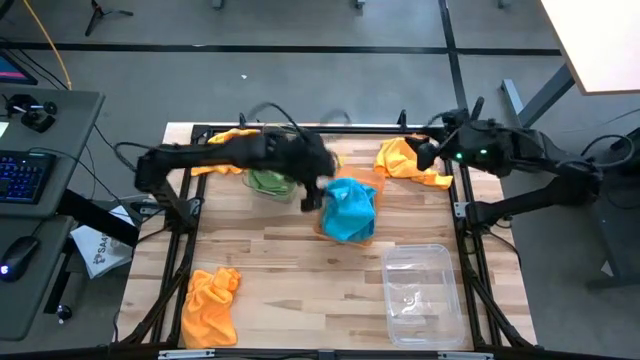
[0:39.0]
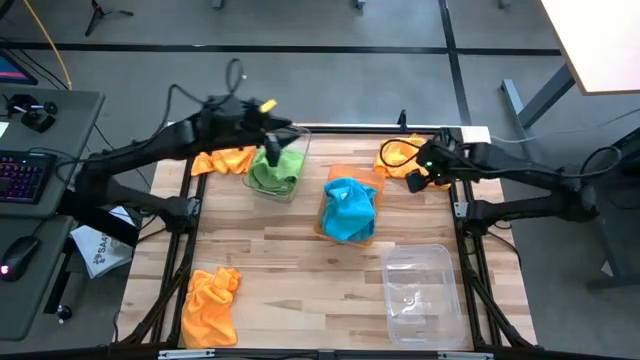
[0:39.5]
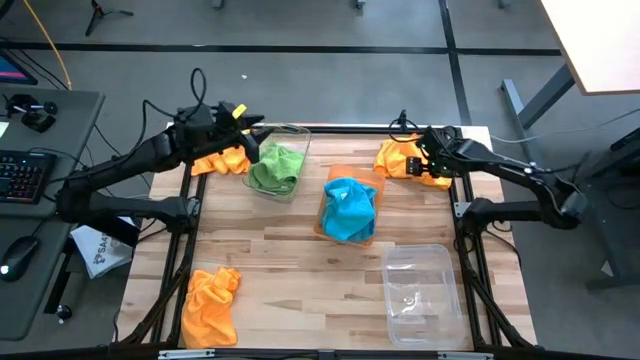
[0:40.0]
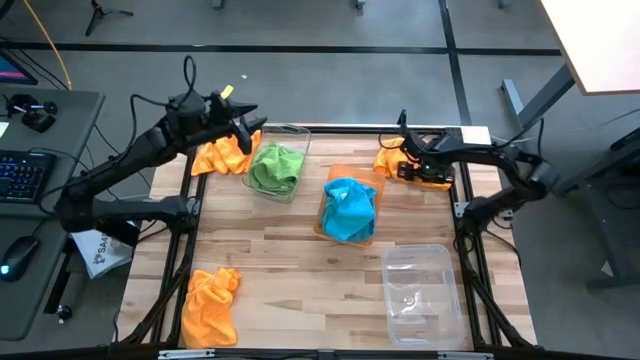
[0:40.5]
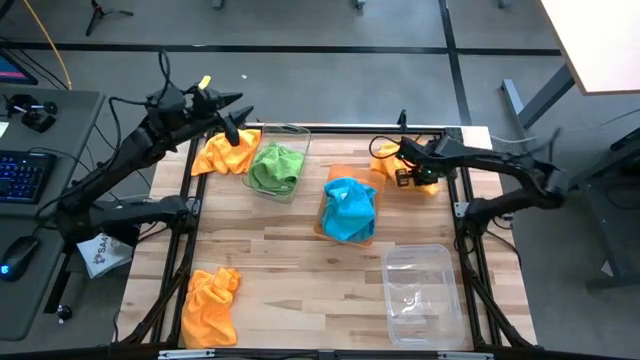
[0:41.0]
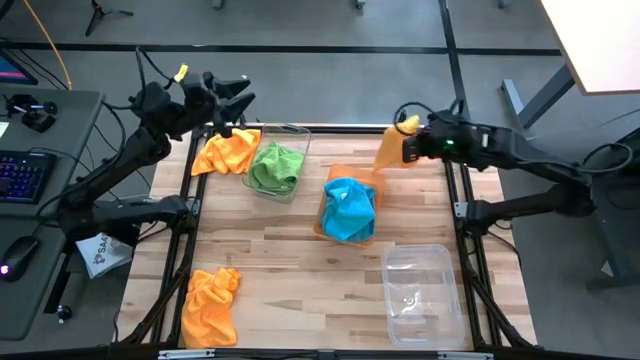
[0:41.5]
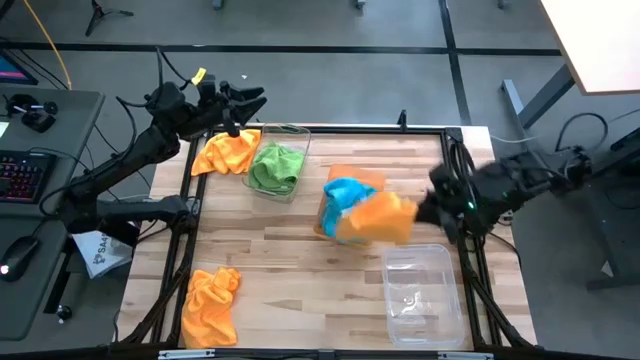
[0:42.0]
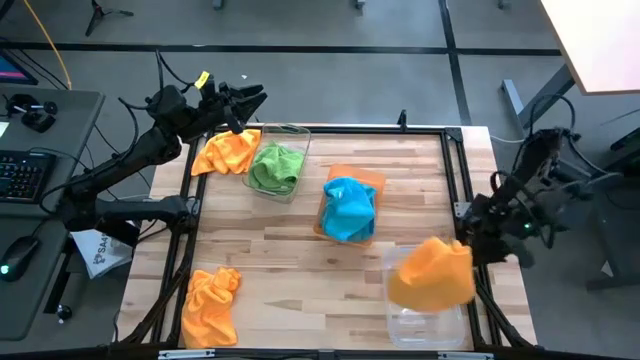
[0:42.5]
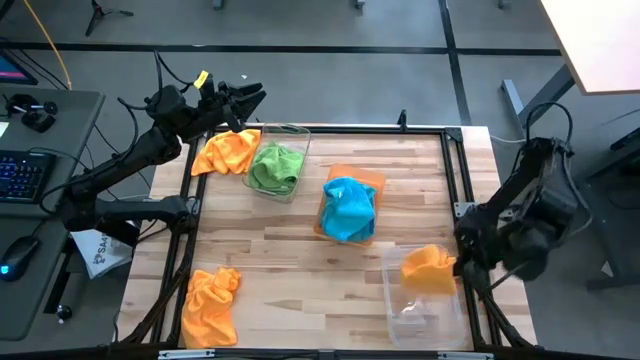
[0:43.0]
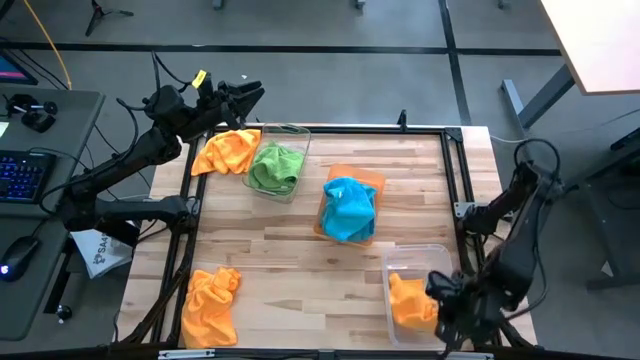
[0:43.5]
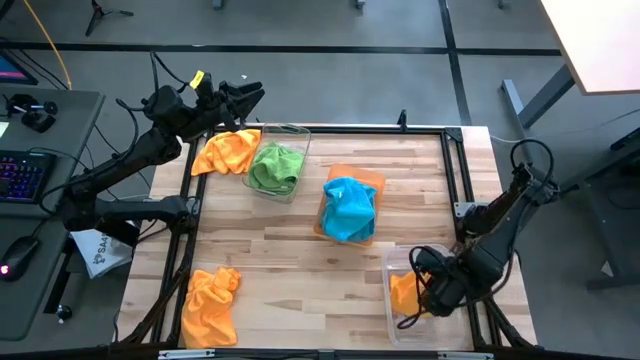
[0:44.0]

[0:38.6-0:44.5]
Task: Sort microfiber towel by color & place in baskets
Put the top right orange microfiber cloth into the transparent white bin

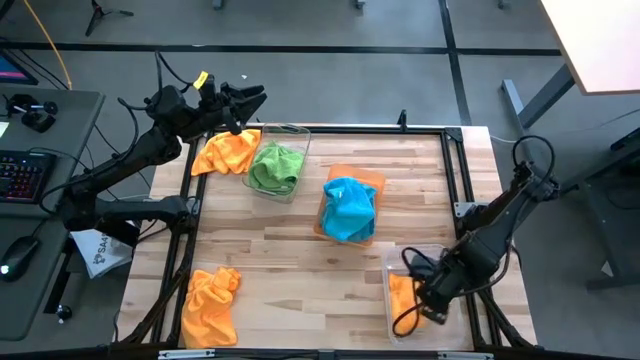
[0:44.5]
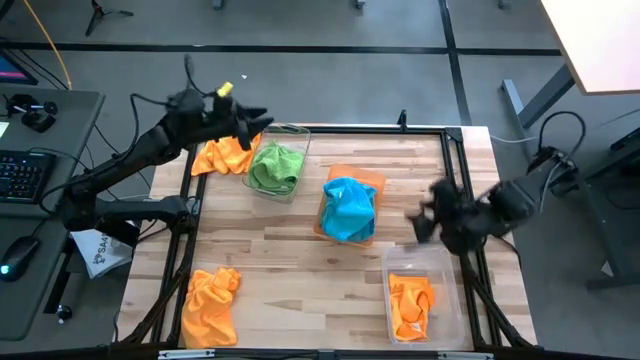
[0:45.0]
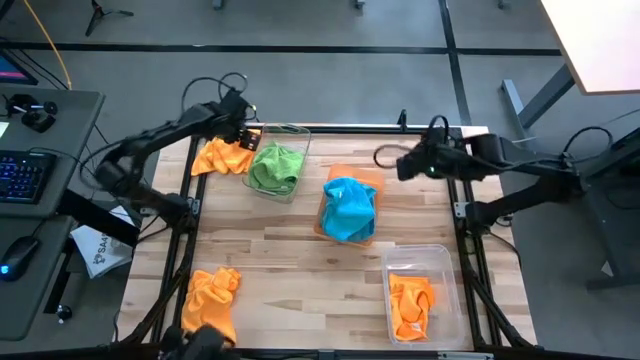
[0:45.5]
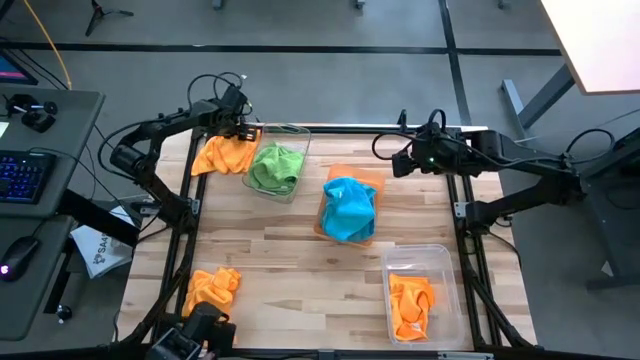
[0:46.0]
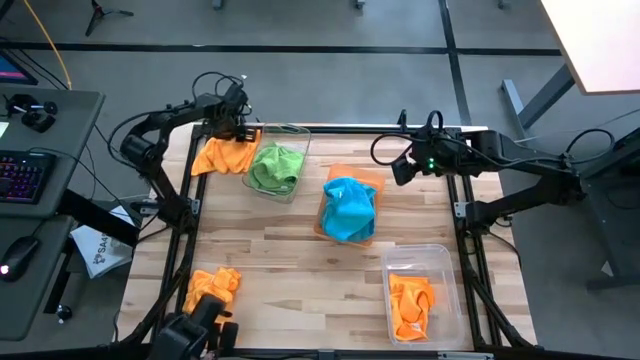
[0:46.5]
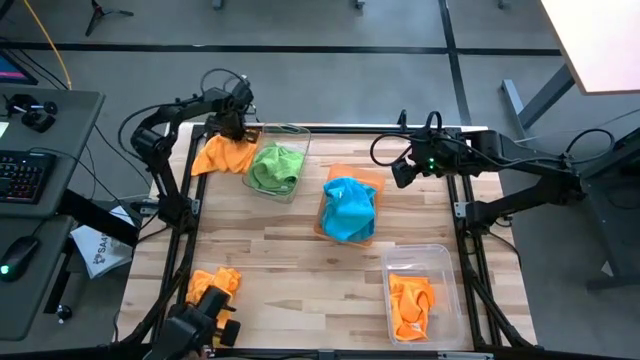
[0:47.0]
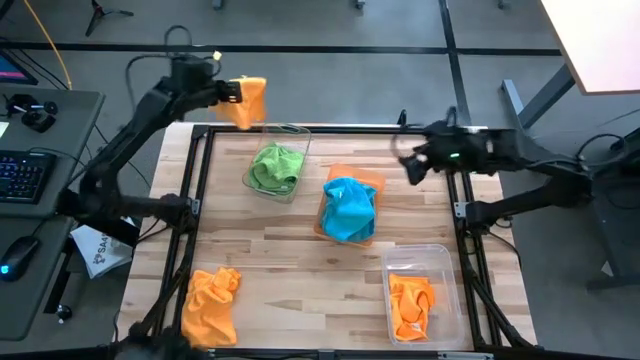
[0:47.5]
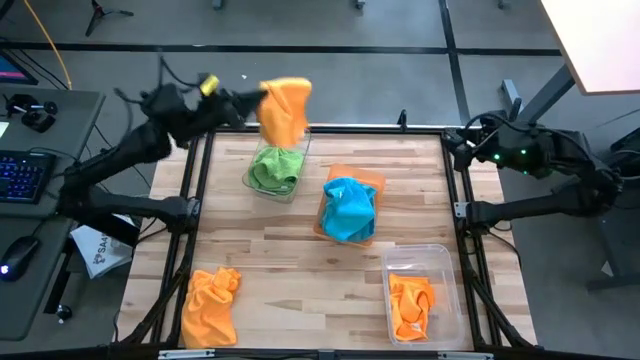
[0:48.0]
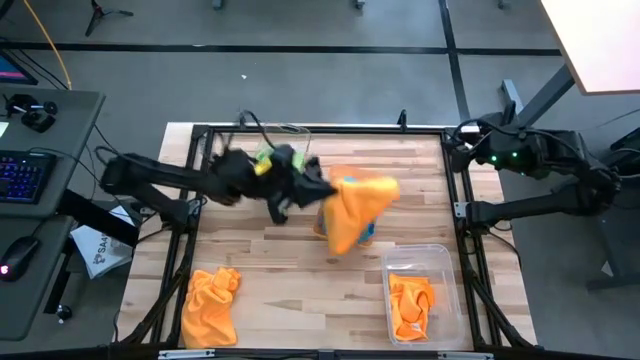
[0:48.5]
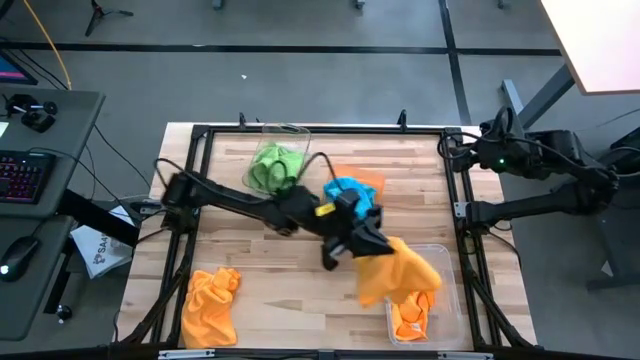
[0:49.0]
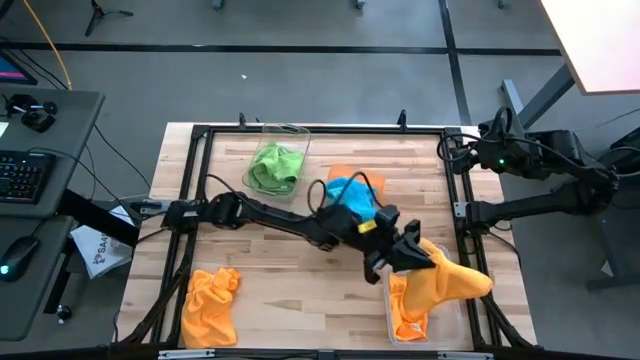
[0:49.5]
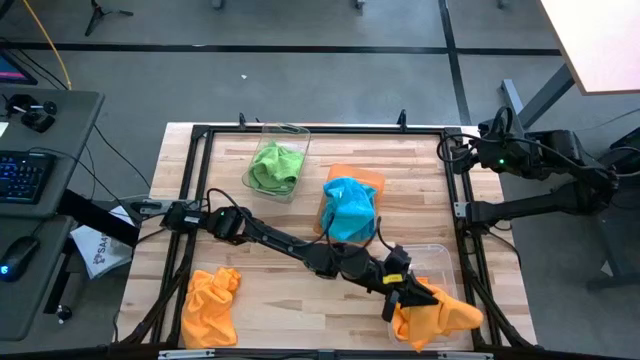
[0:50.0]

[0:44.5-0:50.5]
Put the top orange microfiber cloth into the transparent white bin

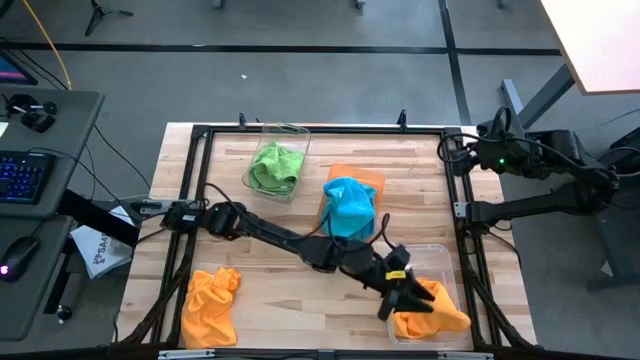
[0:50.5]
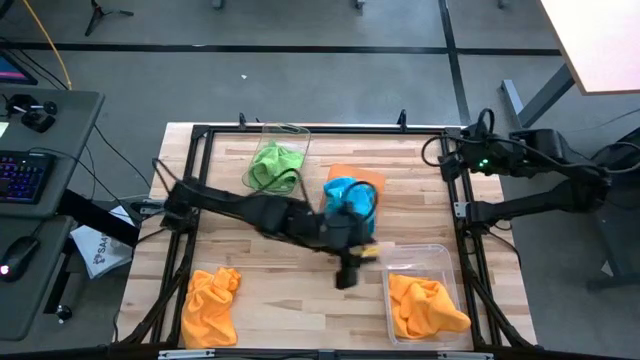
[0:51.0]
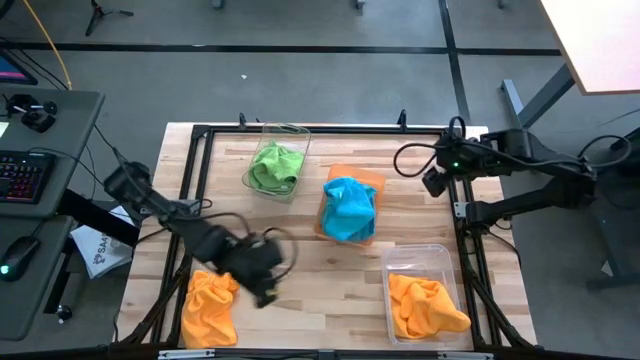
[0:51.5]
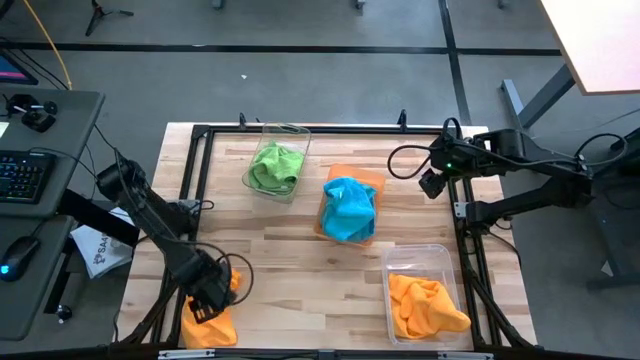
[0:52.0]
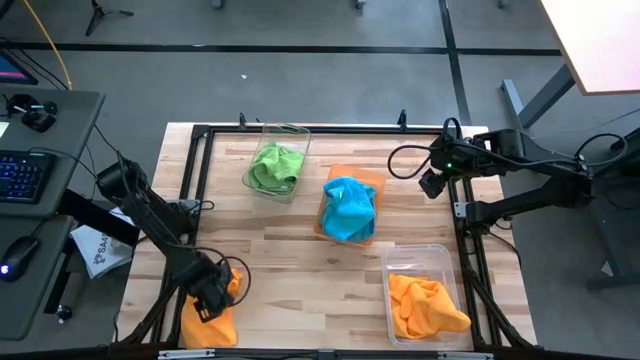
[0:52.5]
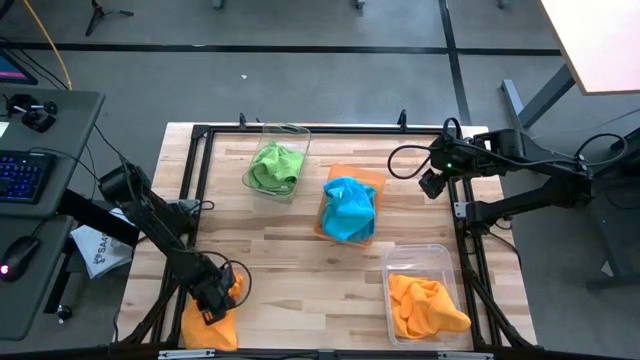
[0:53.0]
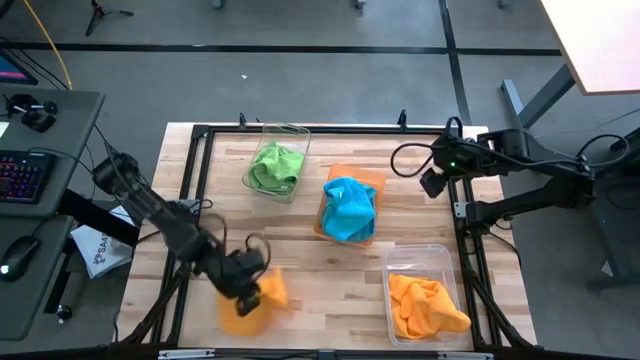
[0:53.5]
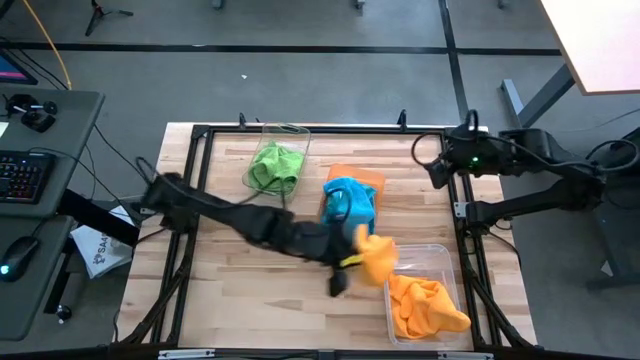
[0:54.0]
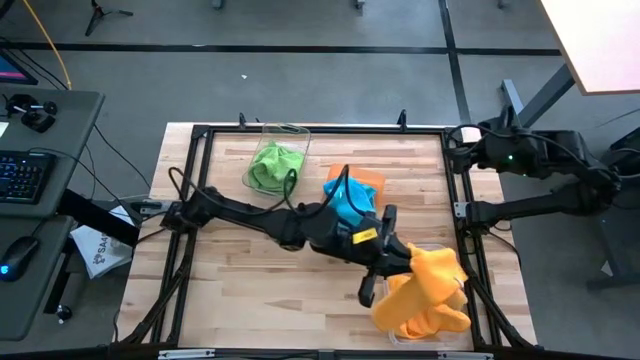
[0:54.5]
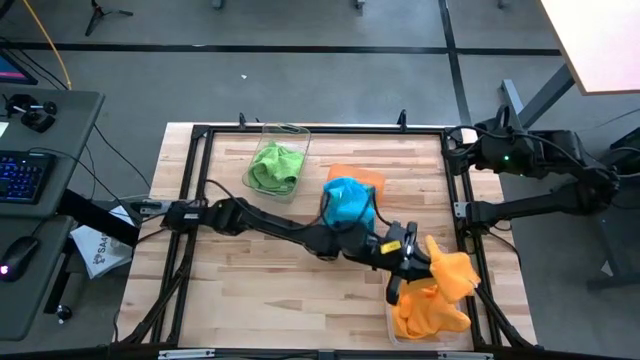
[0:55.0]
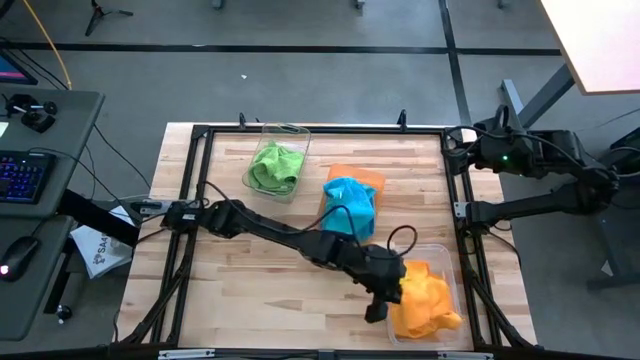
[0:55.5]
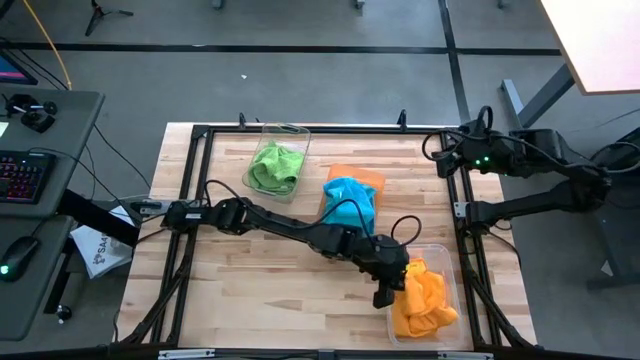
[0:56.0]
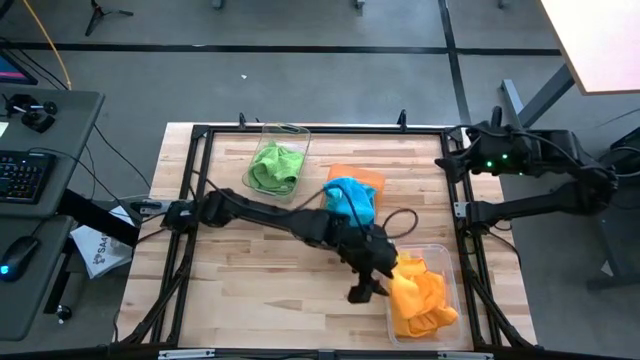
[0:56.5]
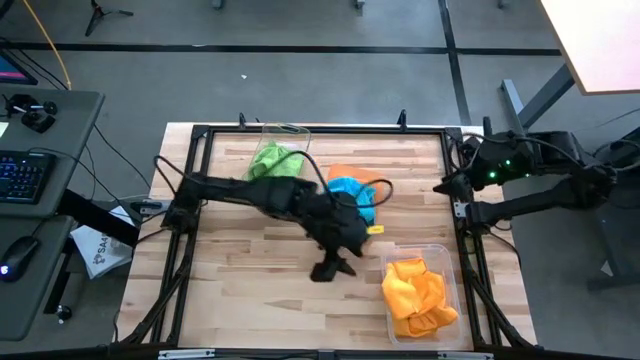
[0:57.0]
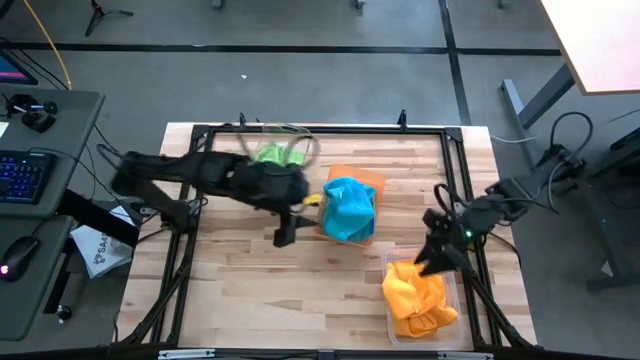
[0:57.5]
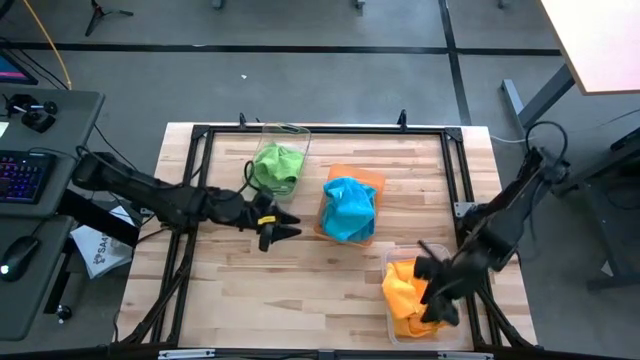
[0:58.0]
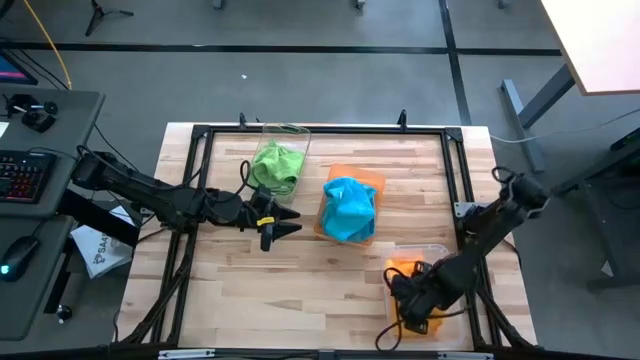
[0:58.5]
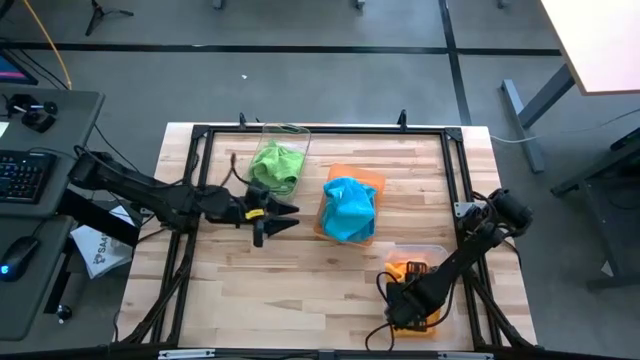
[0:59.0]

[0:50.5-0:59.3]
Put the orange microfiber cloth into the transparent white bin
